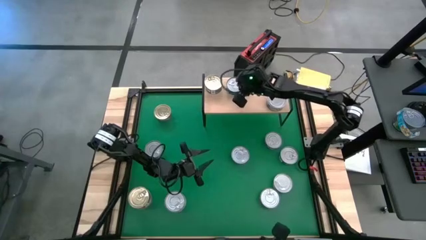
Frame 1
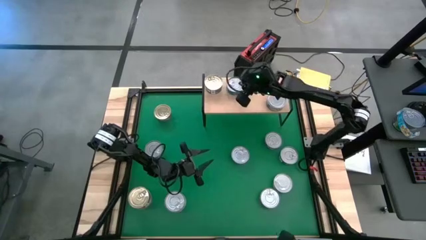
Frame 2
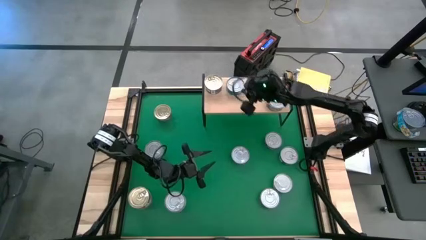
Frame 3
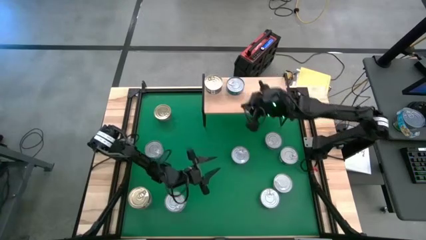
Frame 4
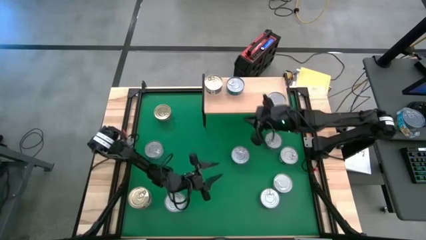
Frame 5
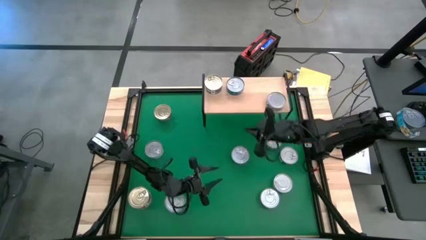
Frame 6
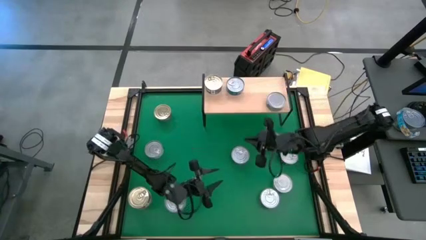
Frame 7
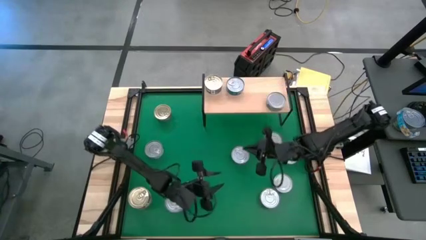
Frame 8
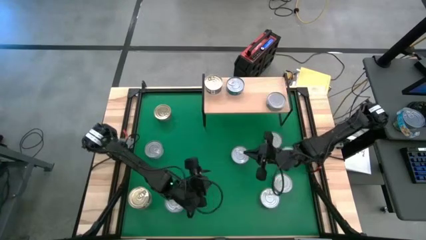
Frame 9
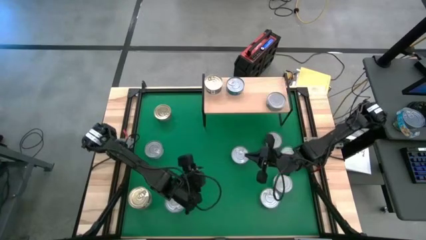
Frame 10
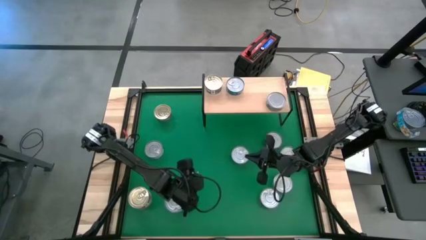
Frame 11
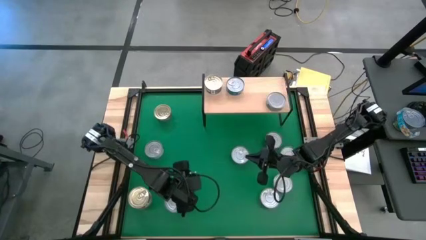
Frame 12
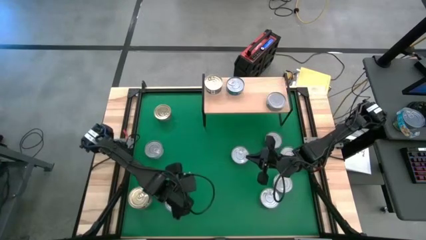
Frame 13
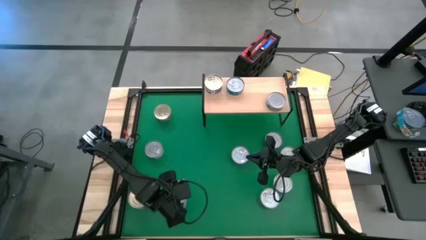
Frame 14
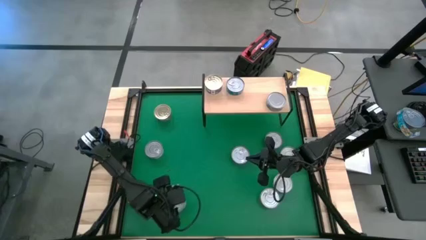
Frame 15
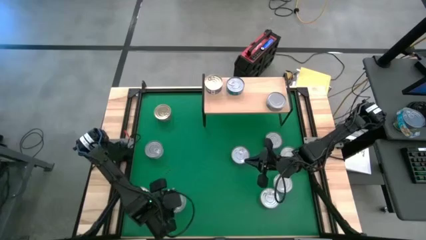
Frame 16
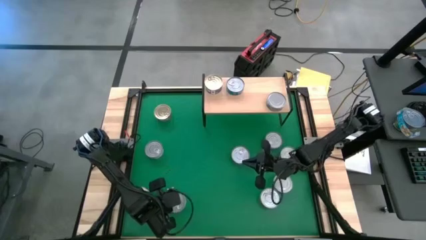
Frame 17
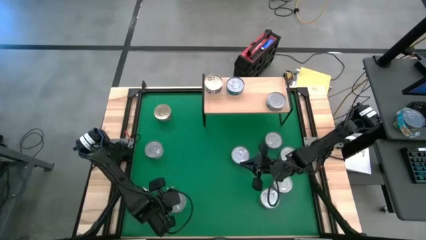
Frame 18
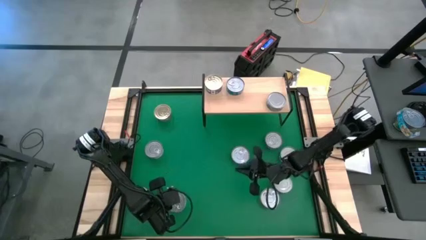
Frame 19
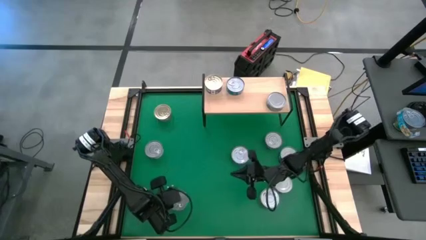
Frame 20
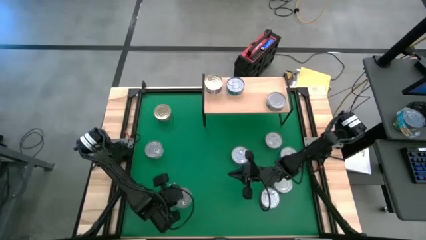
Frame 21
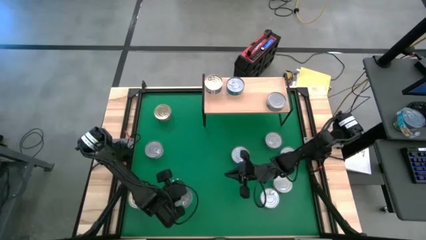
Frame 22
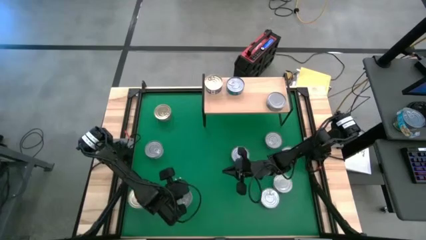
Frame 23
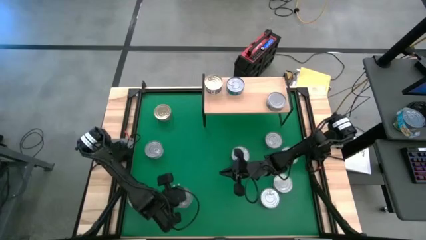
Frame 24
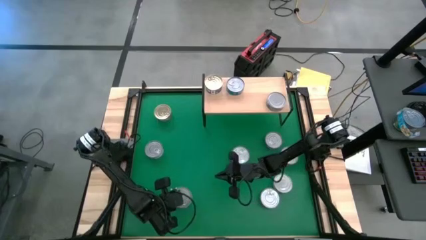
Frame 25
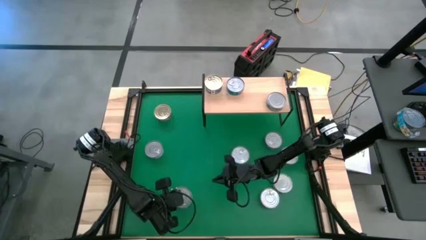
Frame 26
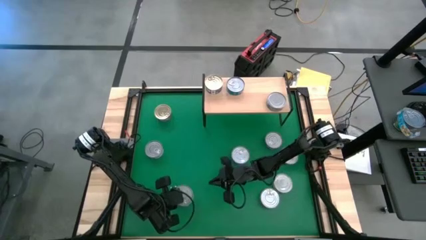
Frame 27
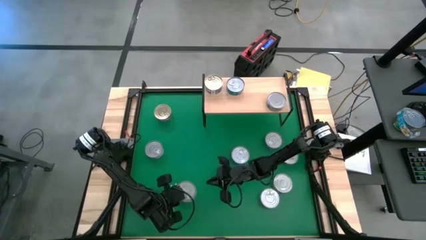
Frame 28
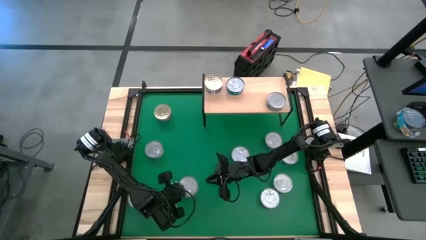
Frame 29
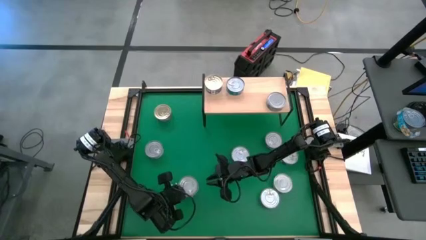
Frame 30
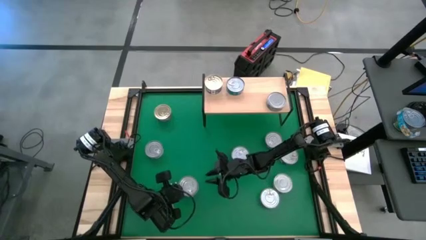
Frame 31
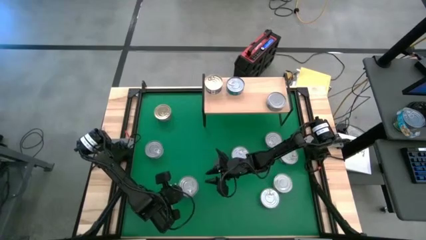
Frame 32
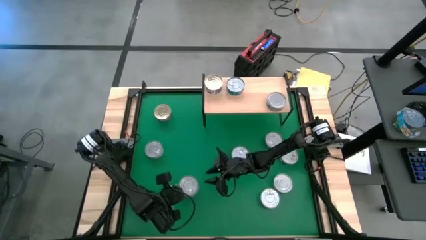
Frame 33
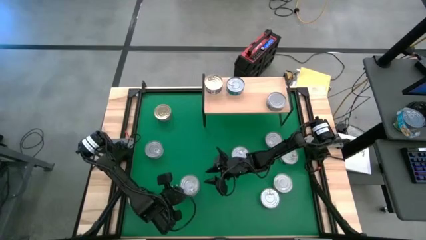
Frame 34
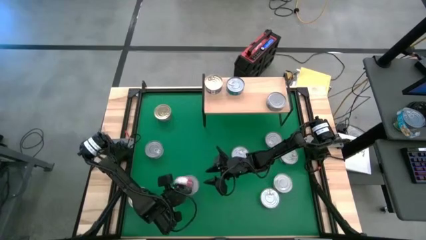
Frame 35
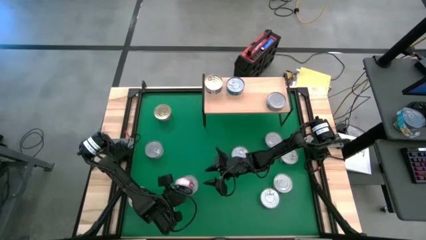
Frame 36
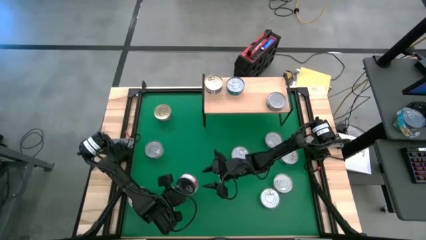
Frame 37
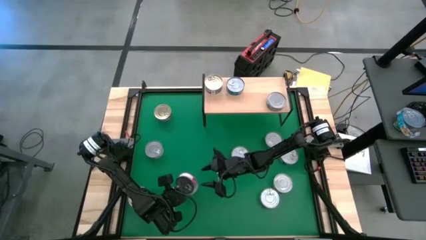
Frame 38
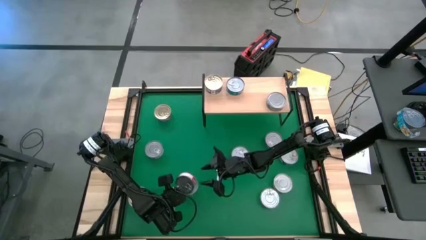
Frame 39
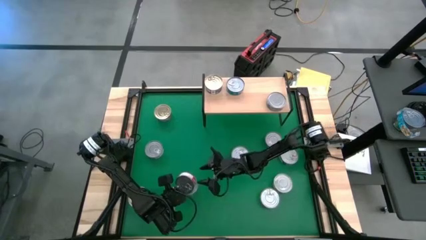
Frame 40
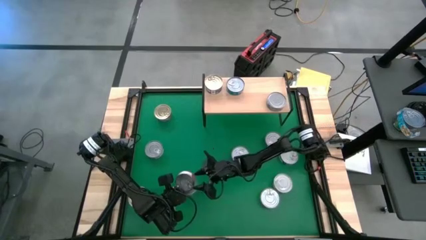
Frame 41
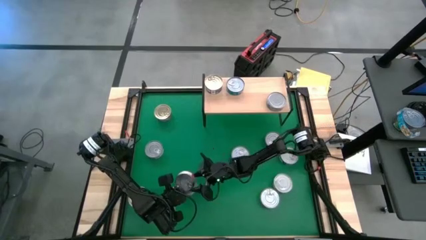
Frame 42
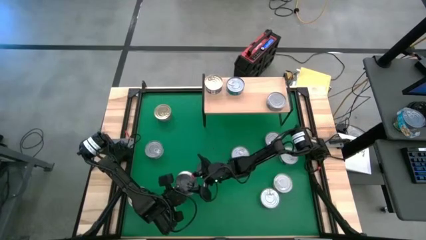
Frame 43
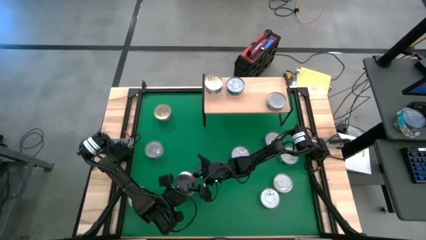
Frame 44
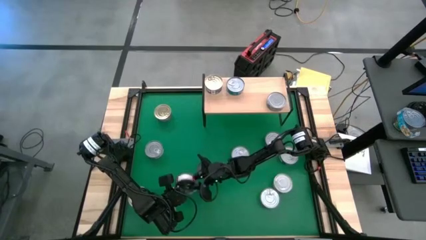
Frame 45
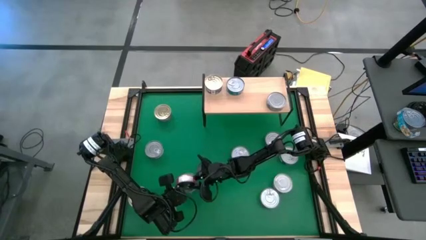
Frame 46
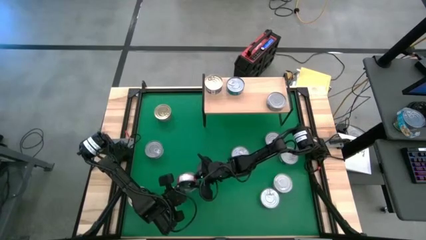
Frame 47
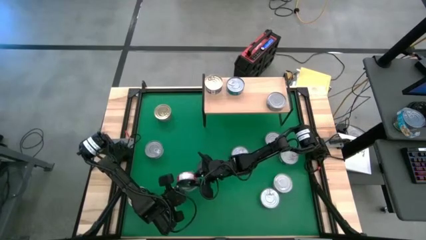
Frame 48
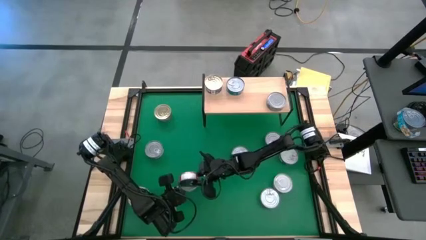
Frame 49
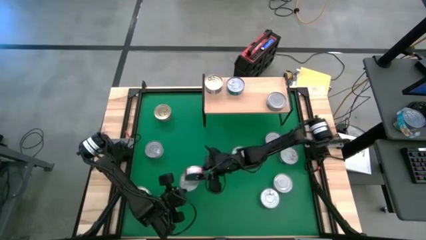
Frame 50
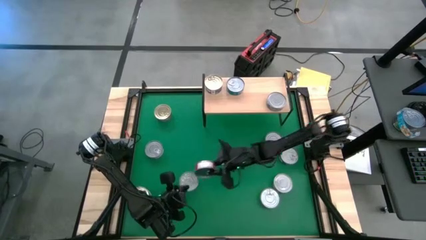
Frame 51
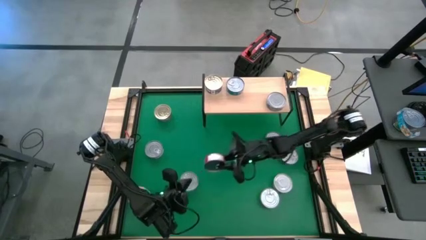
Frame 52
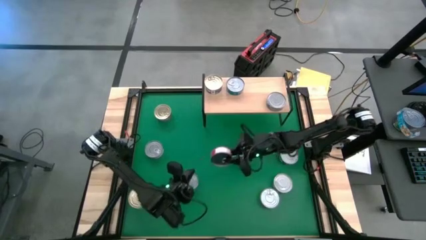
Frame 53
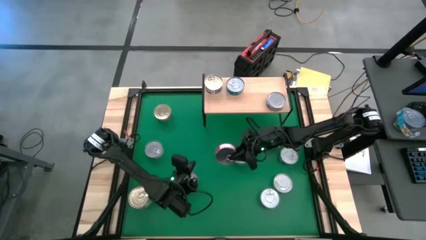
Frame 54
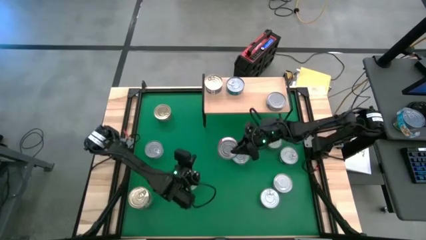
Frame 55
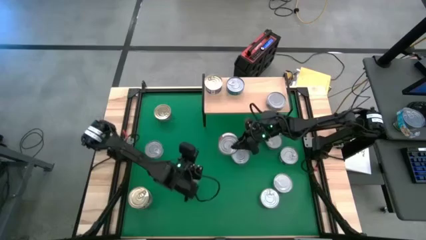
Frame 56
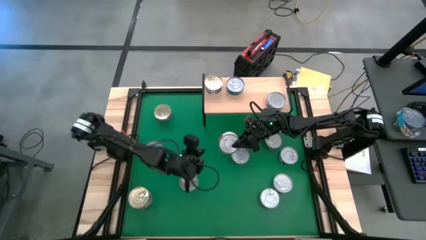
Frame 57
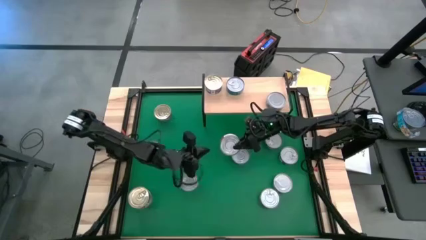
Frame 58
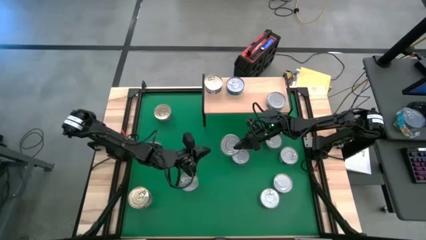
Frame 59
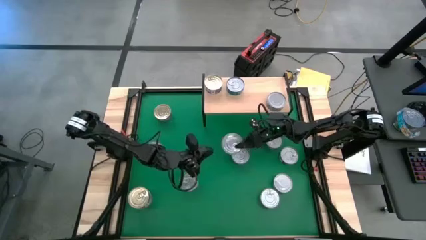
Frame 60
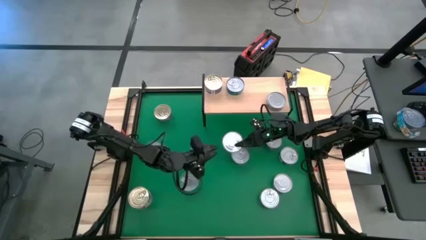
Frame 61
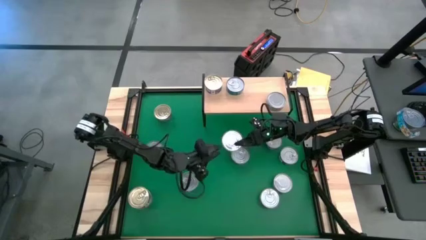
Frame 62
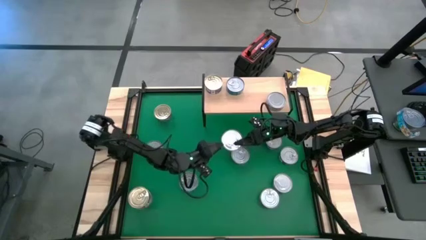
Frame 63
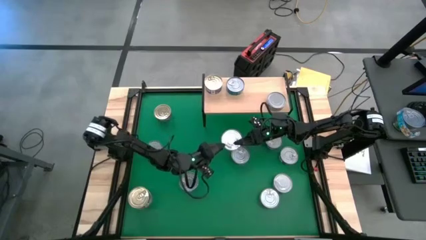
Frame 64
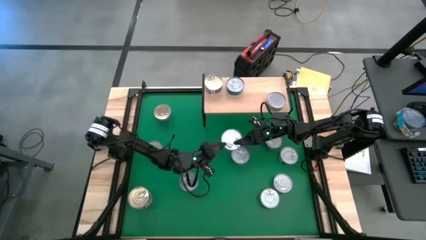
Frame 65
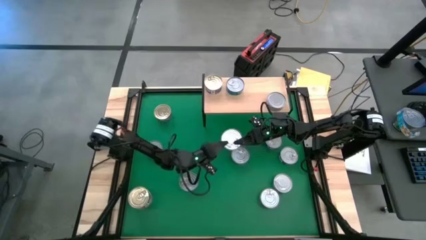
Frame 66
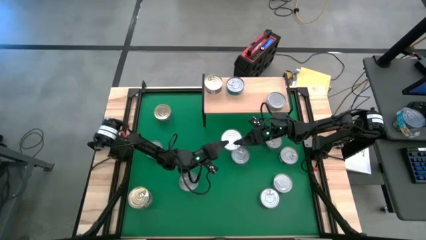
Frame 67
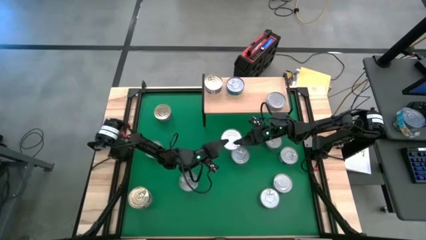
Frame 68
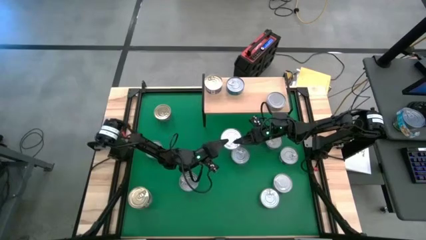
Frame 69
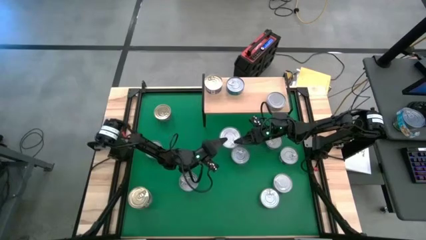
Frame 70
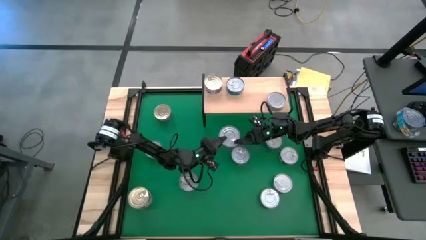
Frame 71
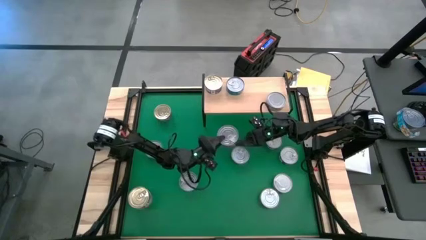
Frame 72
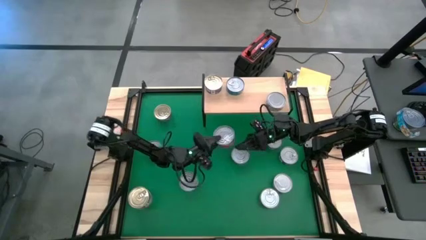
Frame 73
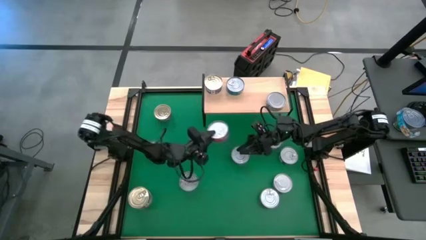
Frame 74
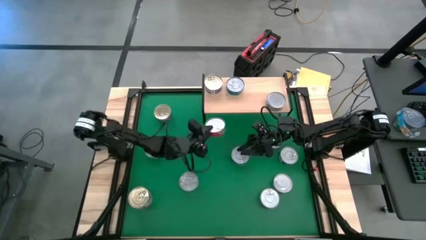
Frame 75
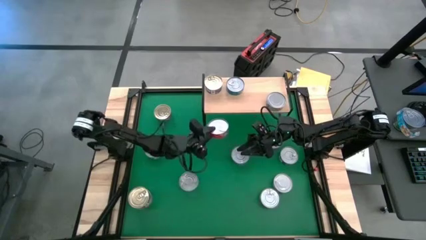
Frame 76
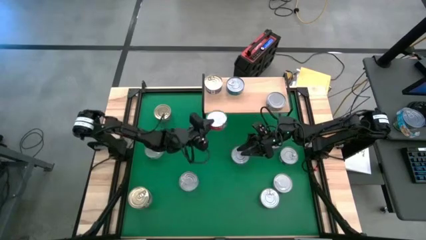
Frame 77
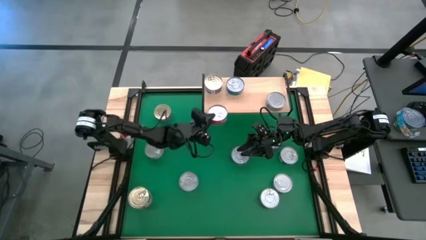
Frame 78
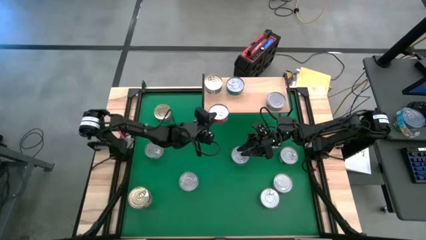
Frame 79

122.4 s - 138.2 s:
Task: Stack canned seafood by type on shelf
Put the red tuna can on the shelf
